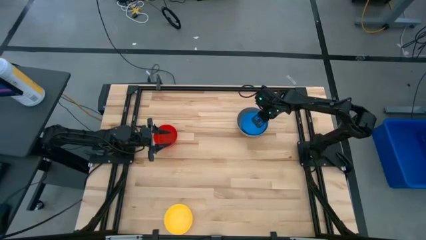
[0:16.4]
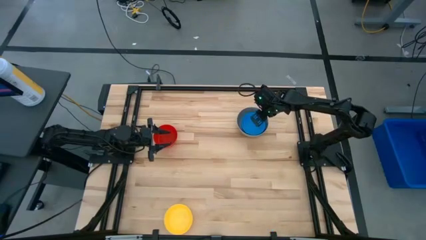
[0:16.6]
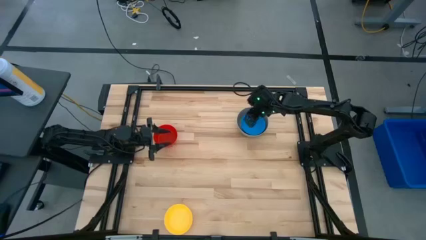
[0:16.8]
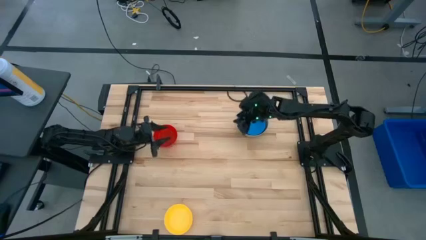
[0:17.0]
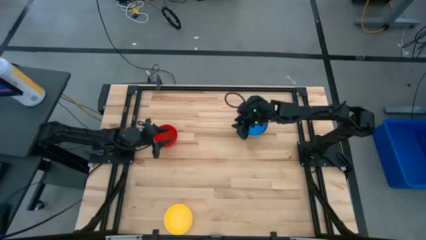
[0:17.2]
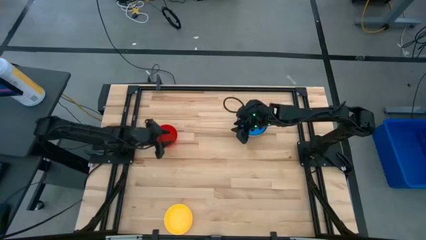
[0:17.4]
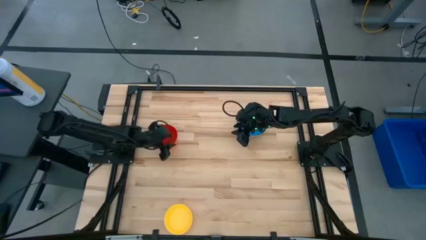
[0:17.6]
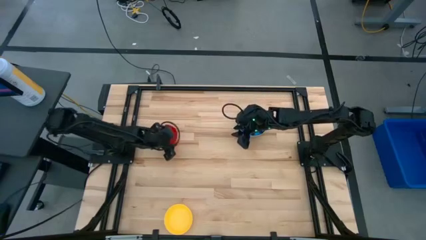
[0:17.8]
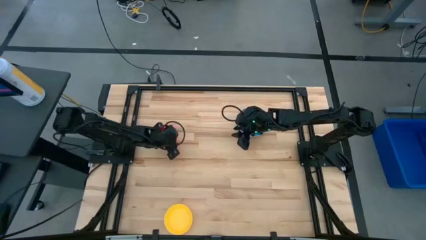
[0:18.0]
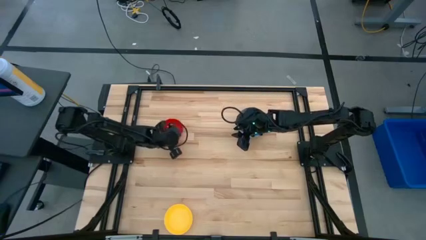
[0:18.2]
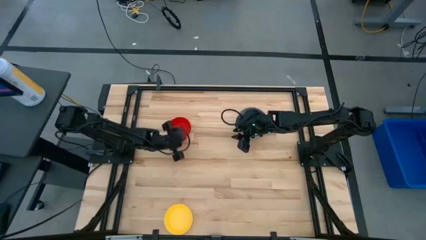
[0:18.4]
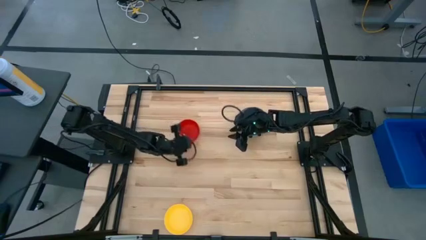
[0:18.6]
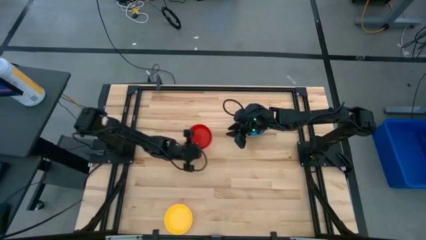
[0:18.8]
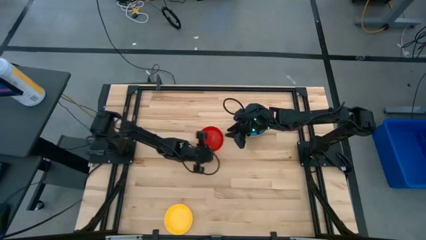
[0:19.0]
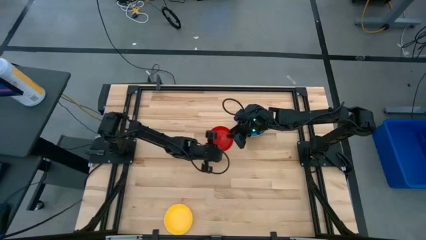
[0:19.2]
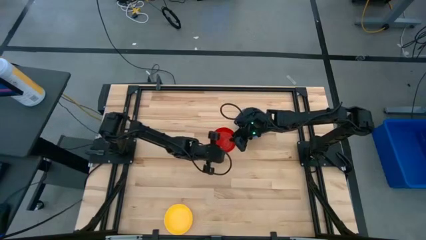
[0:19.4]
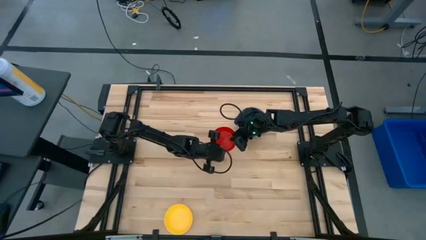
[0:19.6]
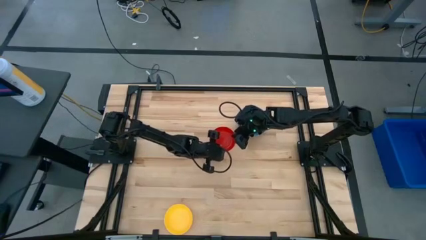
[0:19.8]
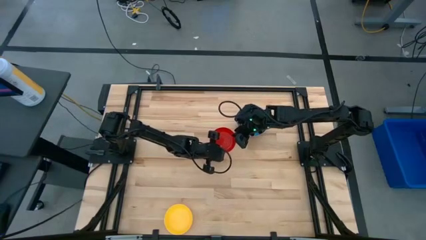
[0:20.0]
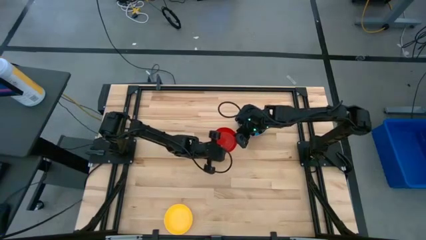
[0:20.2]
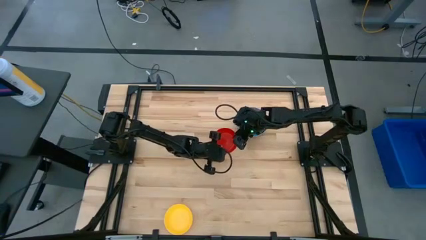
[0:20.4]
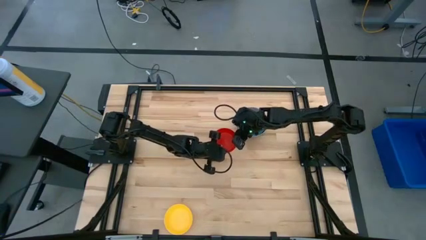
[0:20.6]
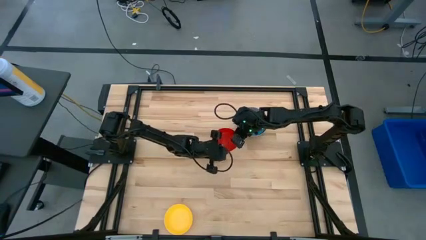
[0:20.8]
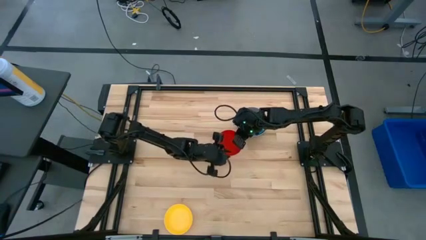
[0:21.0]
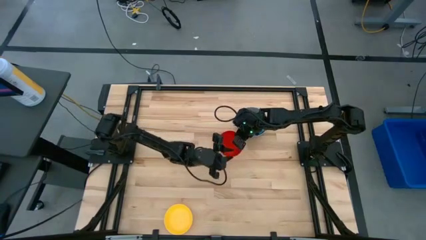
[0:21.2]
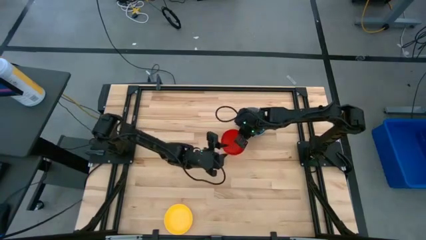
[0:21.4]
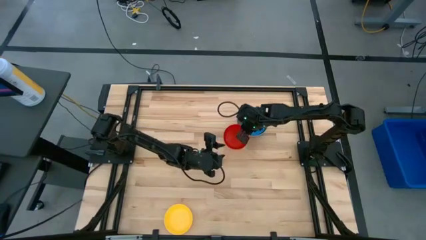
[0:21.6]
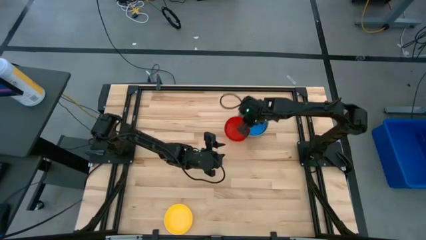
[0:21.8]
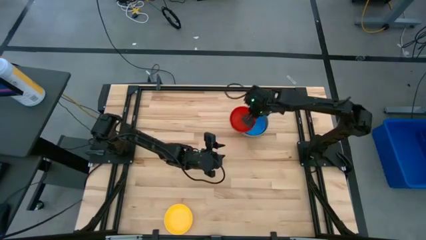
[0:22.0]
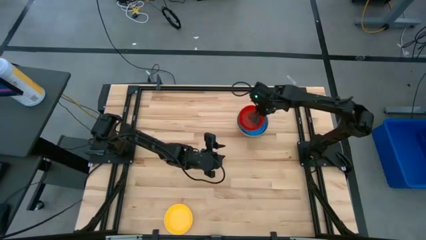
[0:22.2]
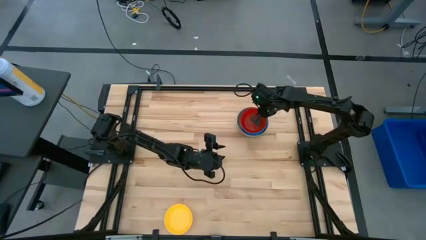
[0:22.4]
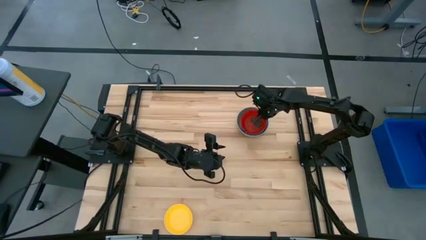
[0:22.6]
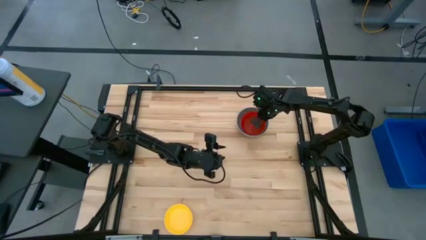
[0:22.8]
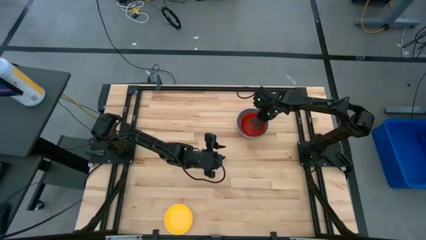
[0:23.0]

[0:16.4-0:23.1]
Stack the red bowl on the blue bowl

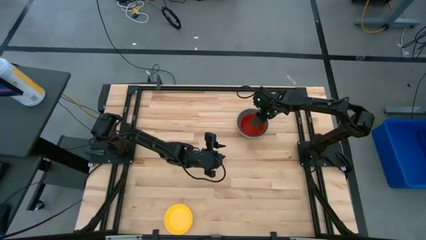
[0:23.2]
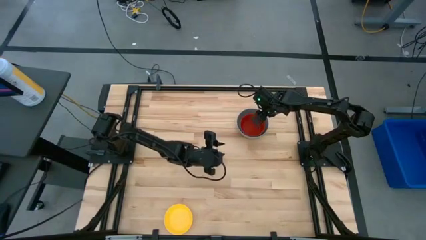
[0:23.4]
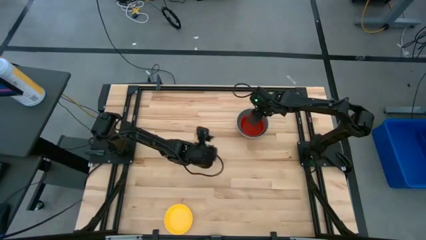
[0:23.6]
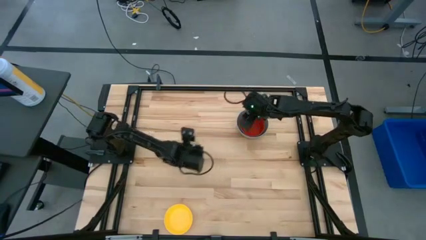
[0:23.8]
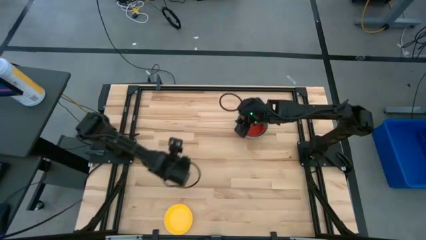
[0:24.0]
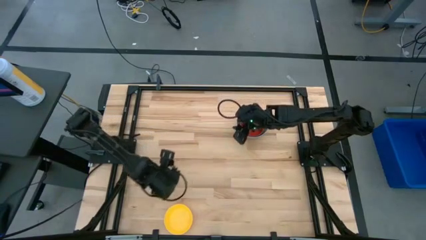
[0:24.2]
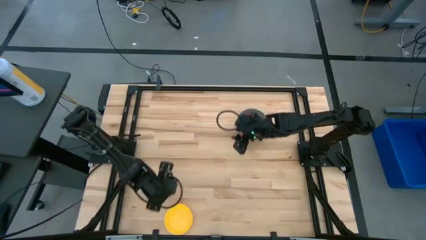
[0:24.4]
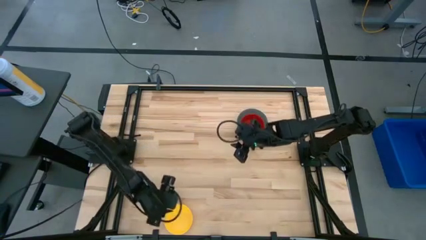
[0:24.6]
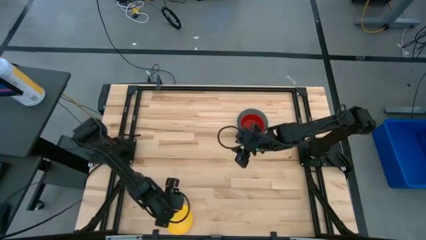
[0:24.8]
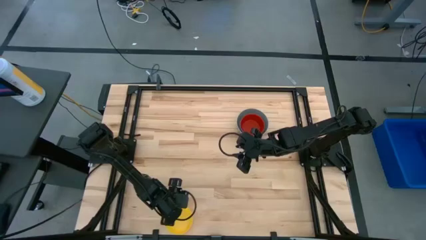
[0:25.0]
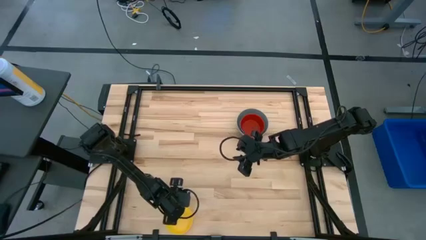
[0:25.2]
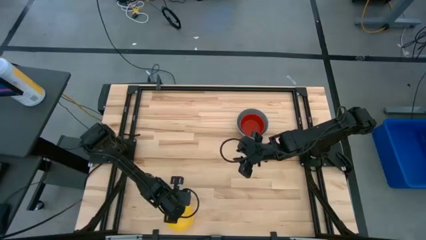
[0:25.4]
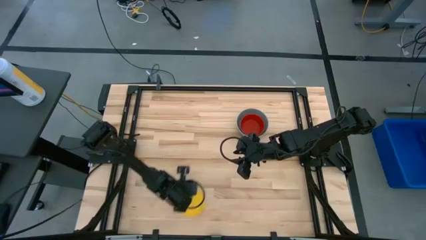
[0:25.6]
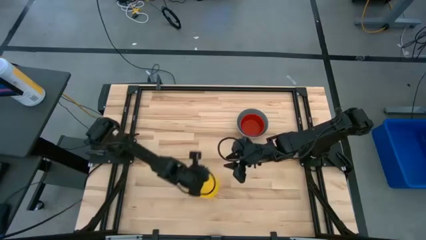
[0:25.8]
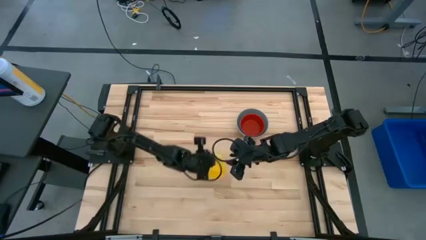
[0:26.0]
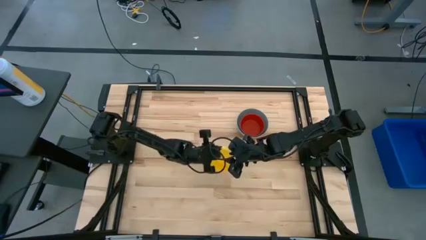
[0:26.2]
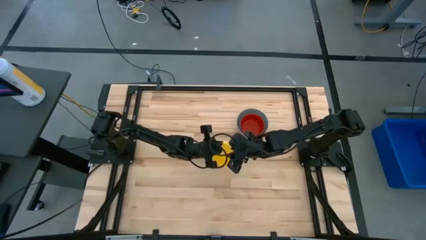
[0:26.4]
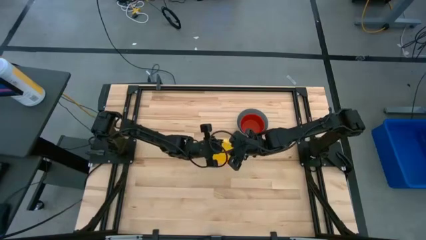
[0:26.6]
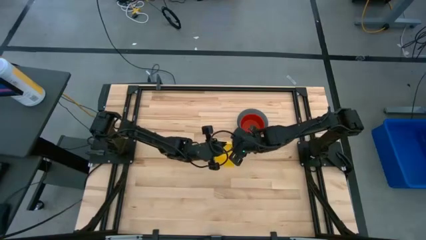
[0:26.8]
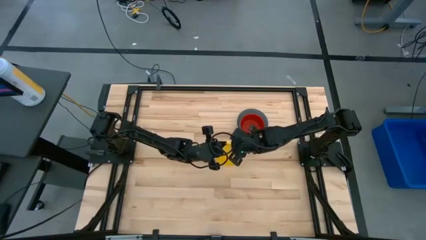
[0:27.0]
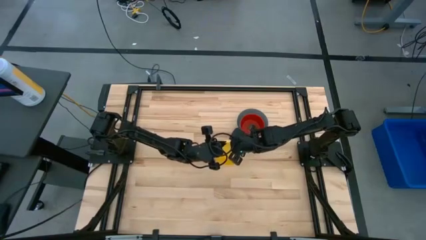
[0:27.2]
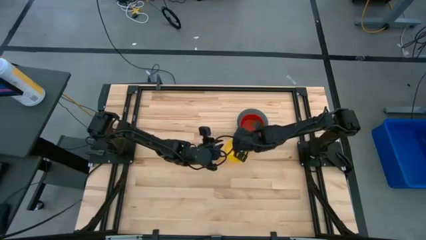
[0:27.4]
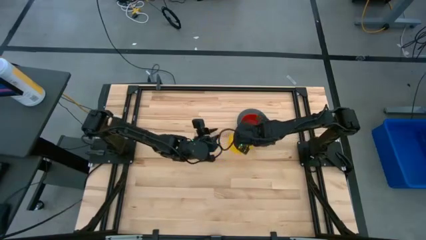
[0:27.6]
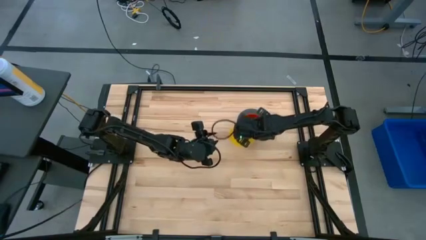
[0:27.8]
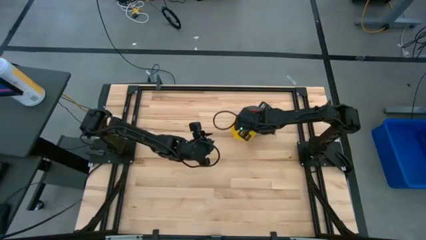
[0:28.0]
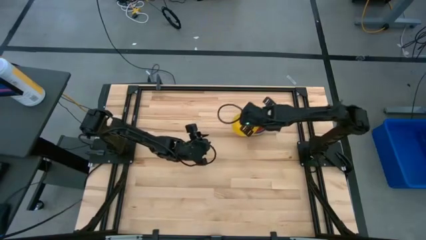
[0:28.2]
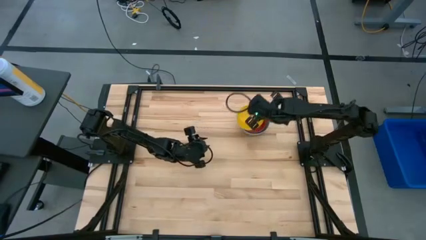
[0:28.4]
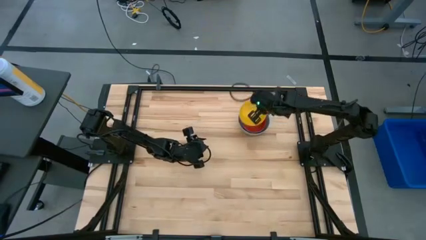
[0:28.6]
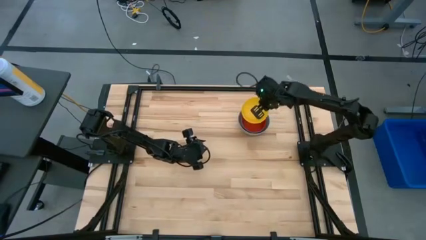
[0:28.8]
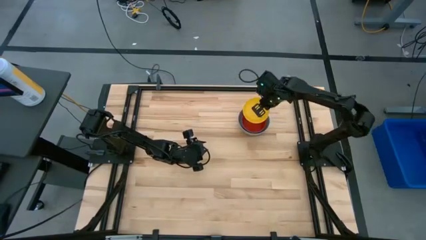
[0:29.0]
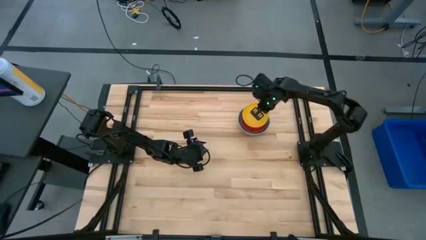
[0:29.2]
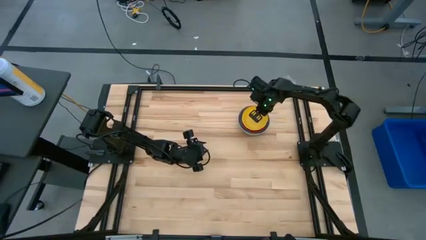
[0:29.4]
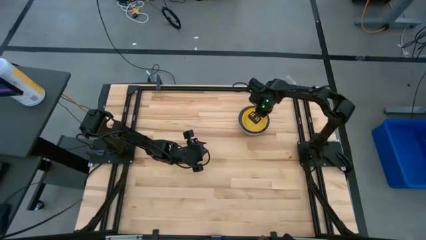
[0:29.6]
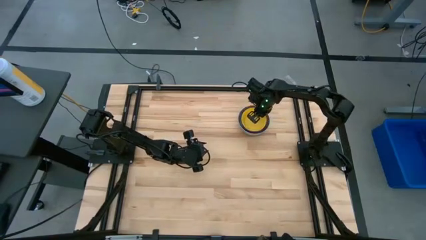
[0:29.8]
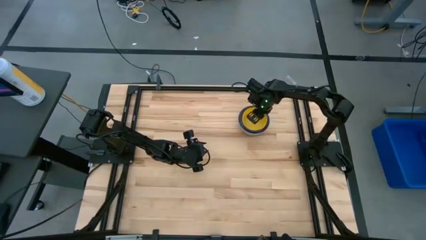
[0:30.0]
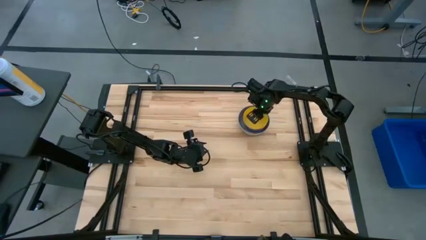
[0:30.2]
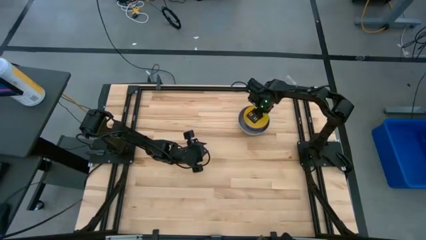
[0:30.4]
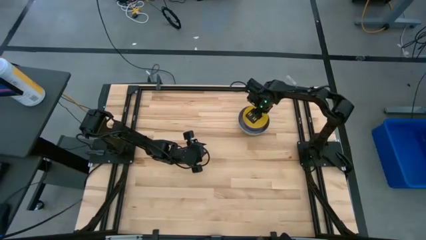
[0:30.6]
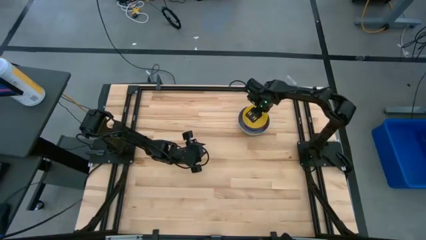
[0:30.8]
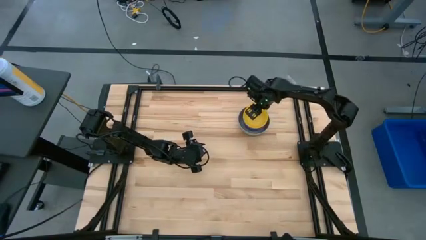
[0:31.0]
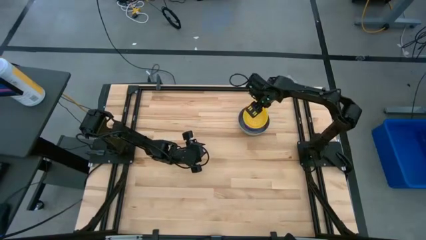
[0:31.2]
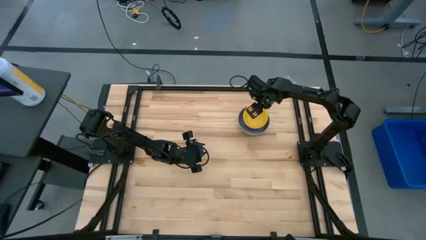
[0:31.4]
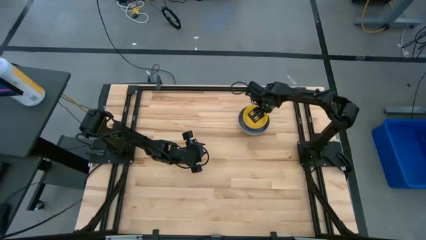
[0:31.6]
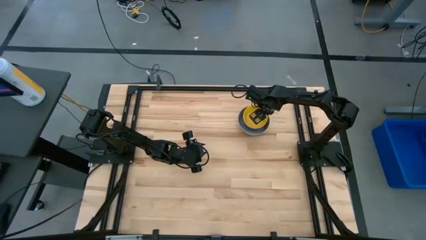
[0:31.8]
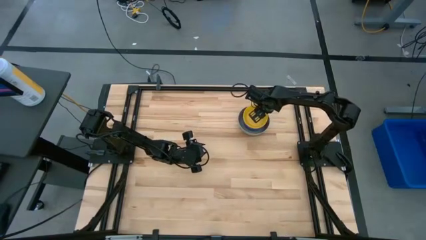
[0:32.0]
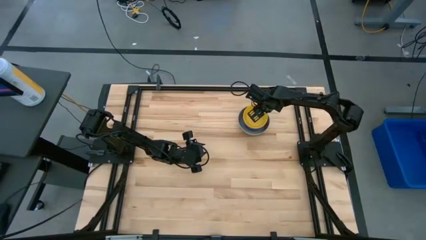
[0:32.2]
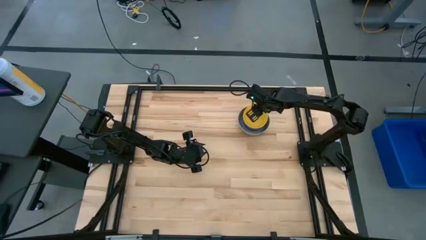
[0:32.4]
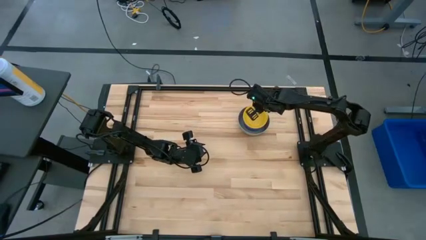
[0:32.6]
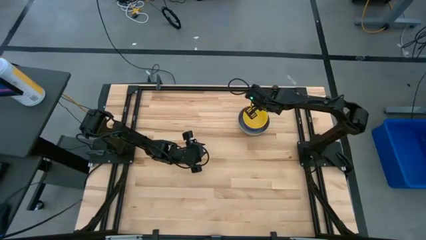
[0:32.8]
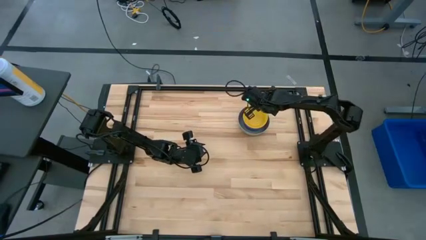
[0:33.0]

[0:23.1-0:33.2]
Stack the yellow bowl on the red bowl
